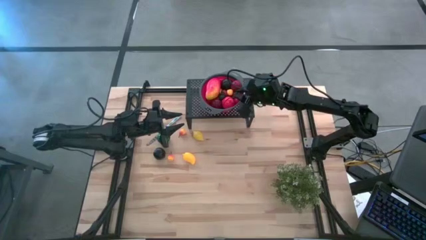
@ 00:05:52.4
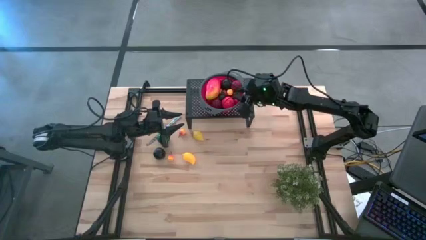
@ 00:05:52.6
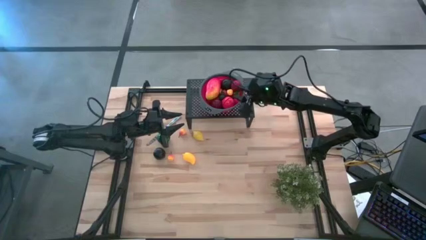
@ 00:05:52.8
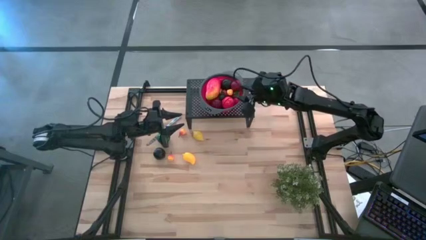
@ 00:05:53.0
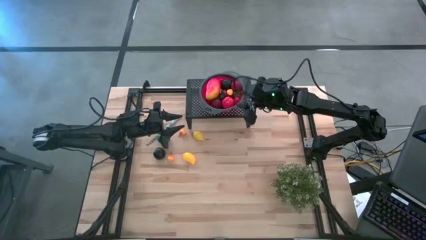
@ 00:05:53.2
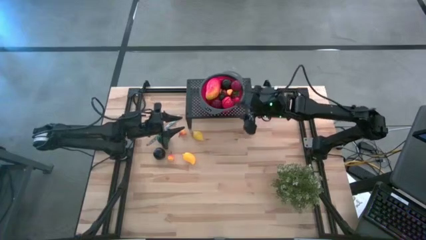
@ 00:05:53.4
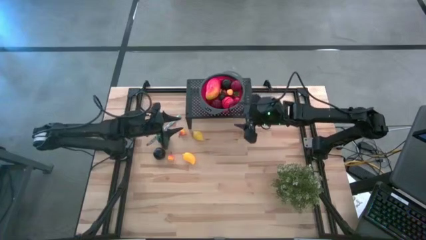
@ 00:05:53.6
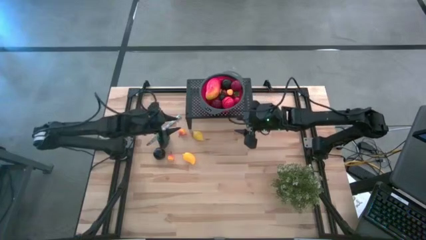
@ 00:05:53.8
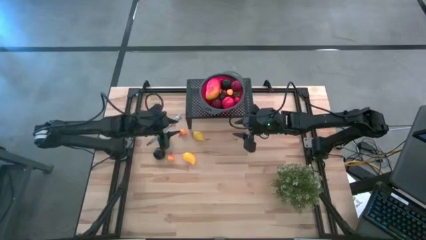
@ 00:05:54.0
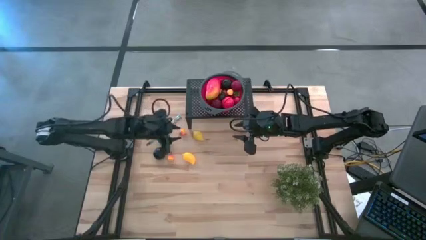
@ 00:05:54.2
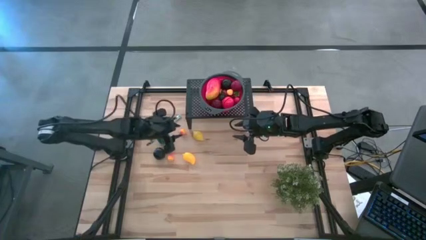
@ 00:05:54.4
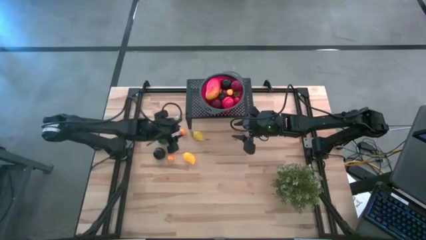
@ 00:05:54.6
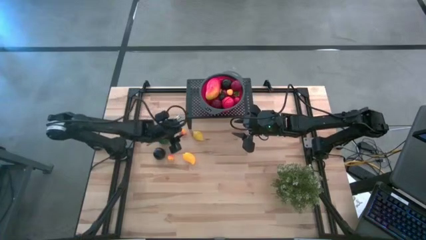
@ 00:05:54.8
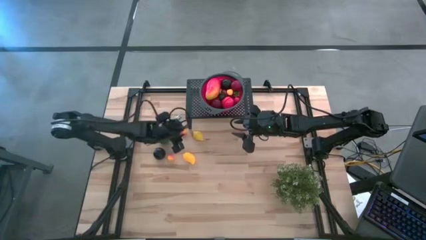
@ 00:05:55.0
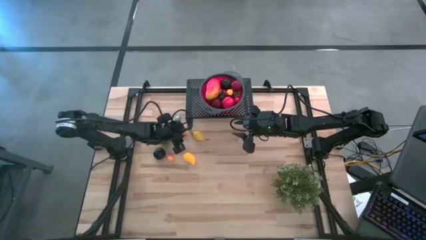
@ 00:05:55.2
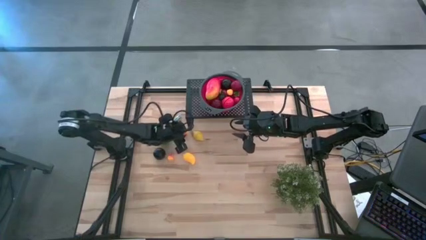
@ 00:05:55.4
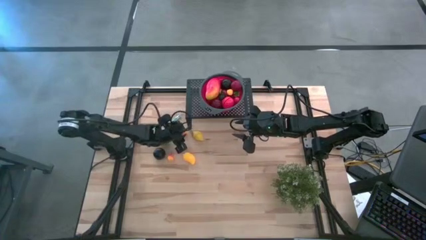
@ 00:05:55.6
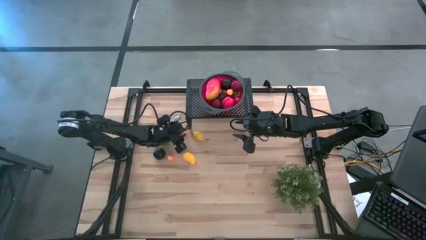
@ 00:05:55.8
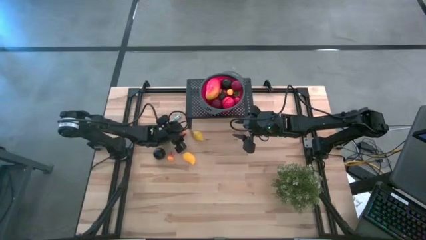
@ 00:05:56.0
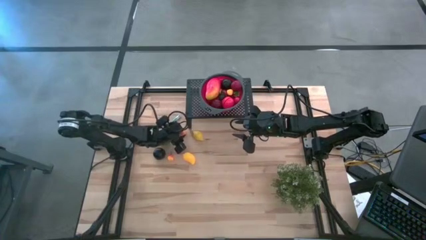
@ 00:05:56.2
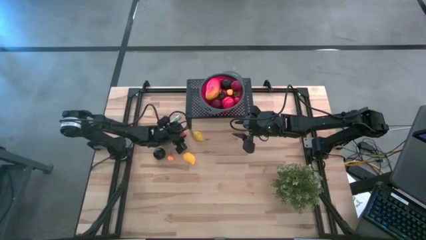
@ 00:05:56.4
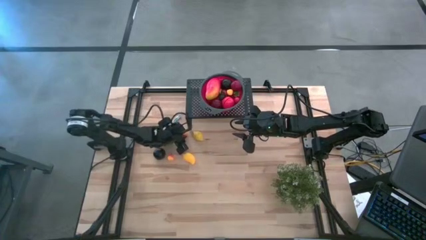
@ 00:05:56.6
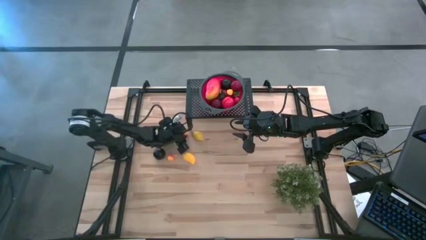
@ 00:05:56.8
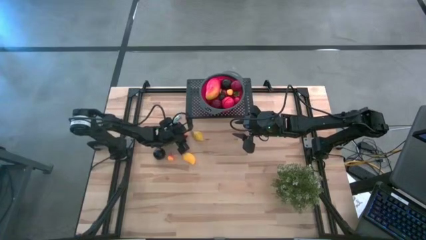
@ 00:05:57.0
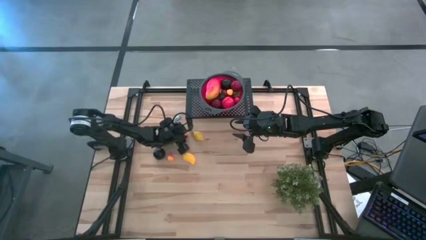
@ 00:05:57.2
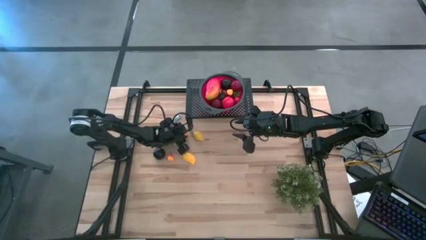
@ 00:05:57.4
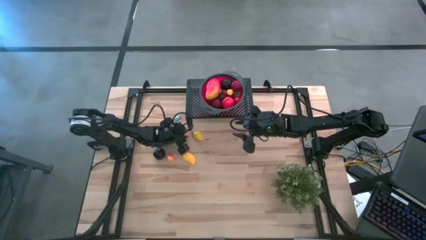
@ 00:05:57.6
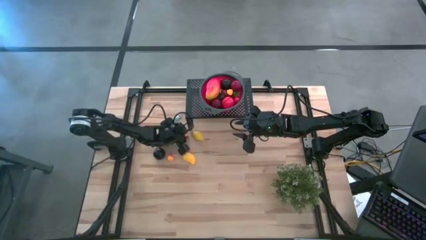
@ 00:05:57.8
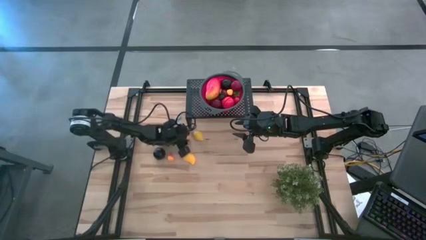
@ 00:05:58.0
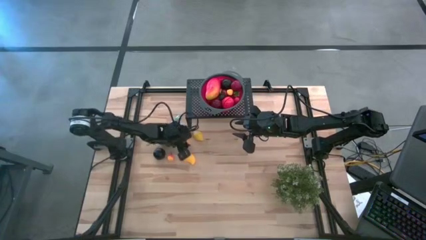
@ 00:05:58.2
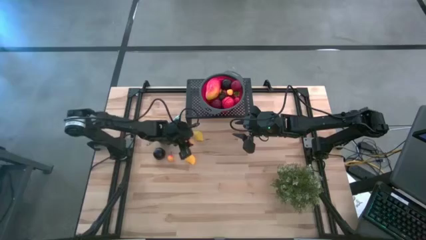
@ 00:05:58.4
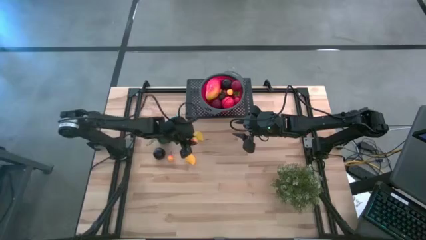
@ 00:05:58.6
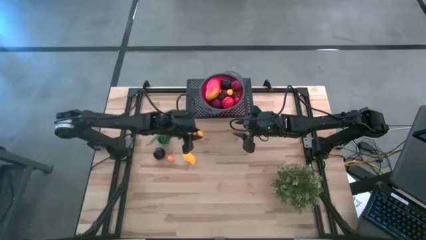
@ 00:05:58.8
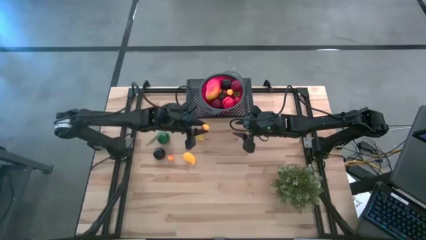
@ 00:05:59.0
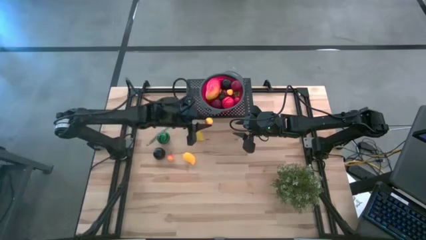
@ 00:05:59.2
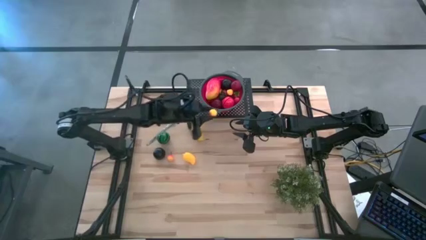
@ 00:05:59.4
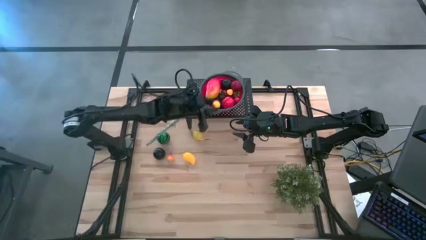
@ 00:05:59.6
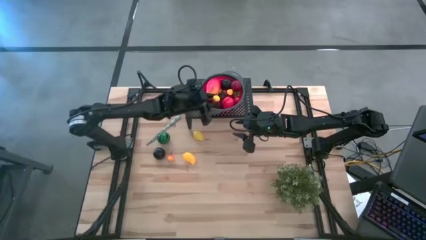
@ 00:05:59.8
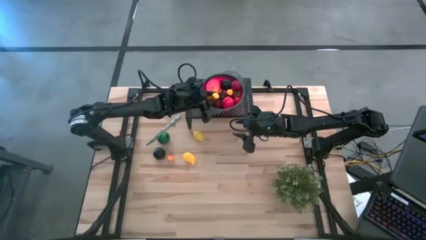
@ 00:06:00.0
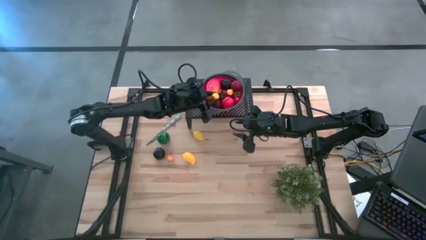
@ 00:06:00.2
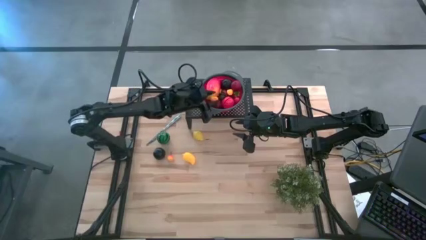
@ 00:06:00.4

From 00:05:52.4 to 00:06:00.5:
Task: Pick & Place Fruit
Put the peach in the red colander on the shelf

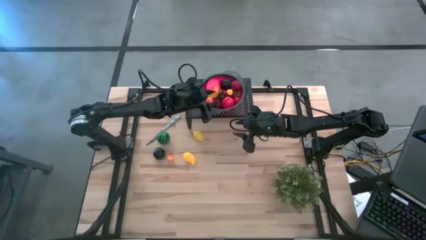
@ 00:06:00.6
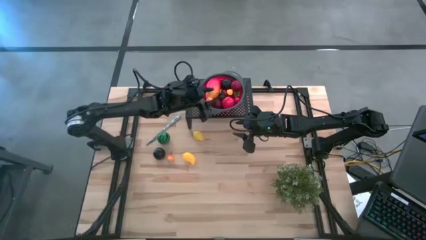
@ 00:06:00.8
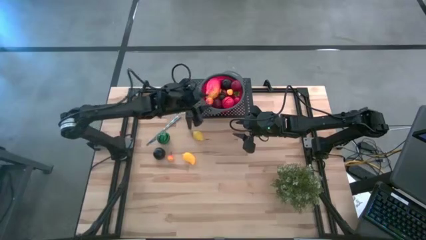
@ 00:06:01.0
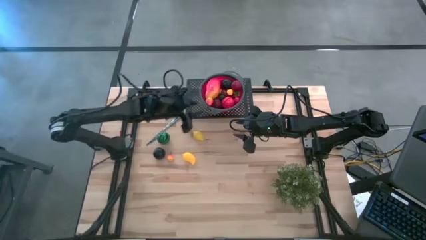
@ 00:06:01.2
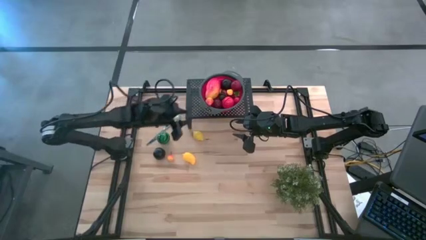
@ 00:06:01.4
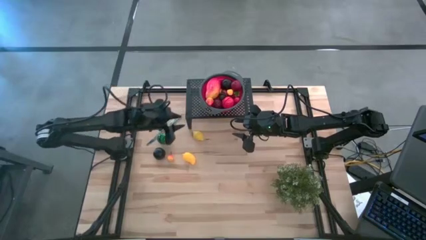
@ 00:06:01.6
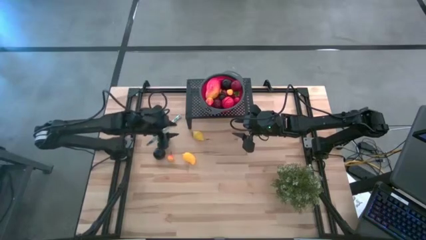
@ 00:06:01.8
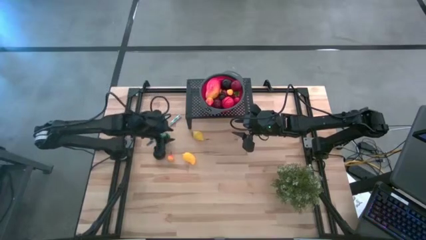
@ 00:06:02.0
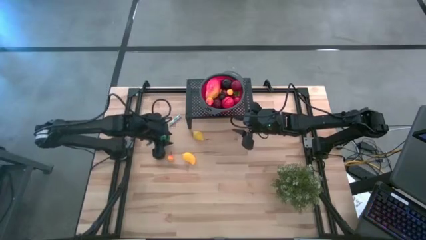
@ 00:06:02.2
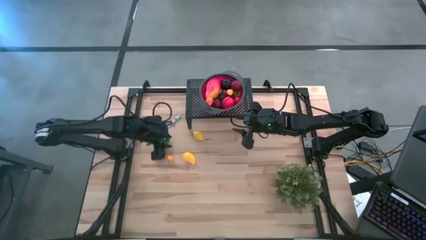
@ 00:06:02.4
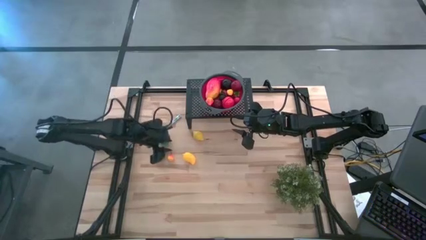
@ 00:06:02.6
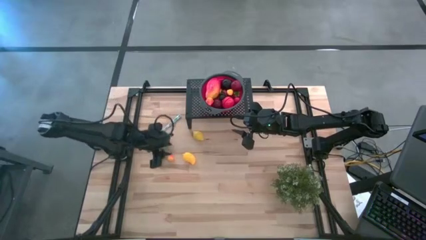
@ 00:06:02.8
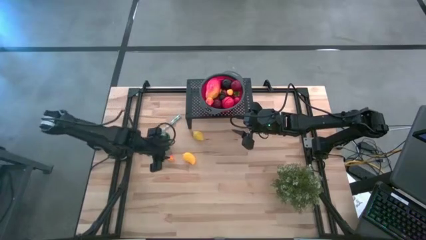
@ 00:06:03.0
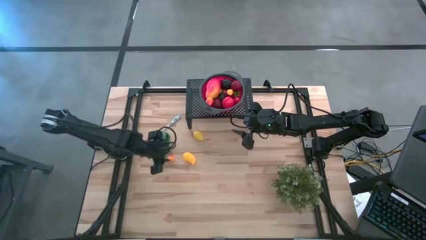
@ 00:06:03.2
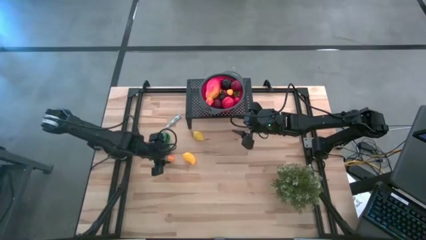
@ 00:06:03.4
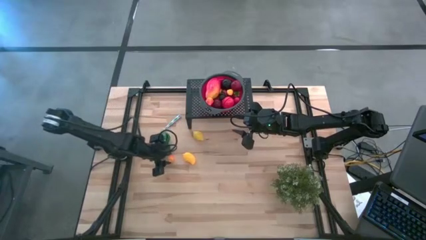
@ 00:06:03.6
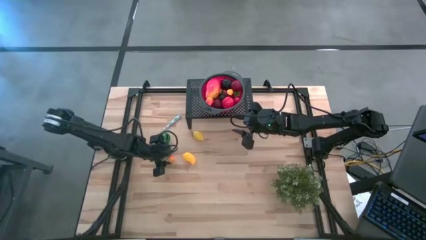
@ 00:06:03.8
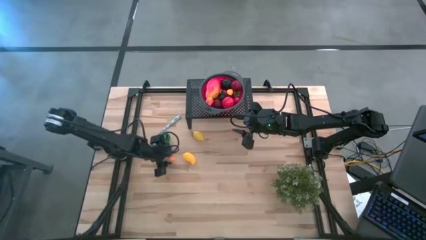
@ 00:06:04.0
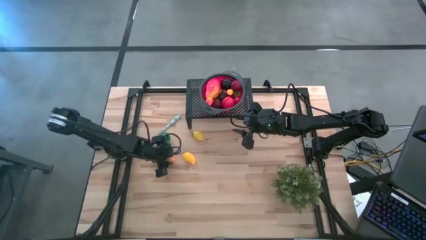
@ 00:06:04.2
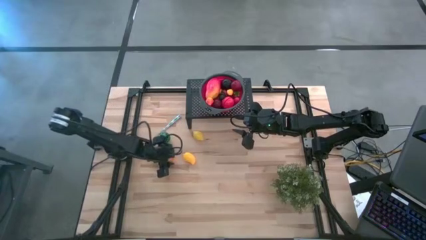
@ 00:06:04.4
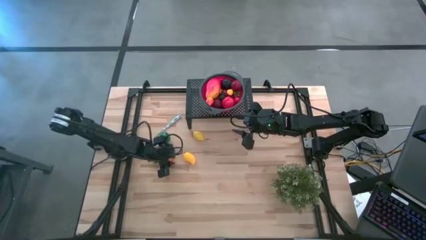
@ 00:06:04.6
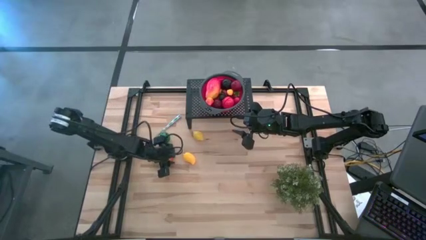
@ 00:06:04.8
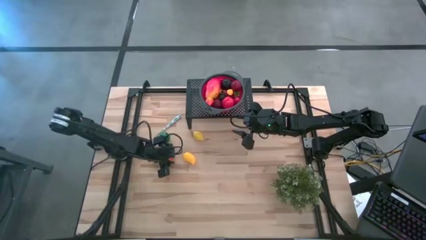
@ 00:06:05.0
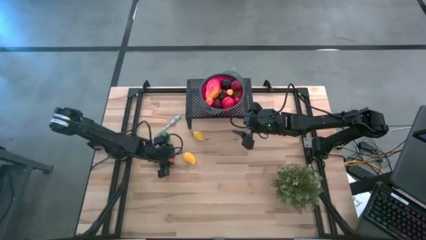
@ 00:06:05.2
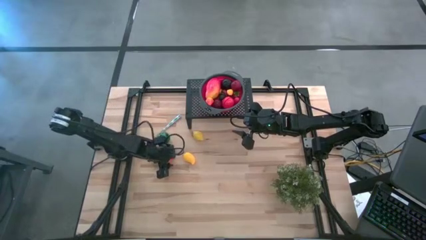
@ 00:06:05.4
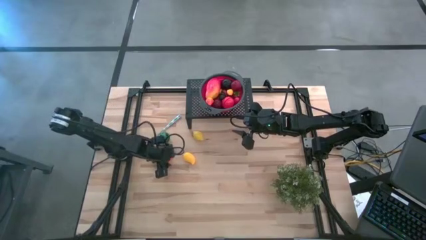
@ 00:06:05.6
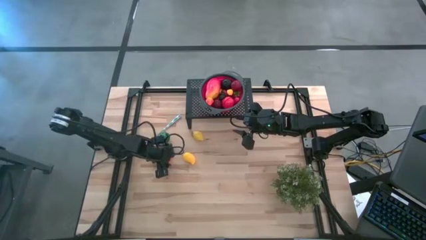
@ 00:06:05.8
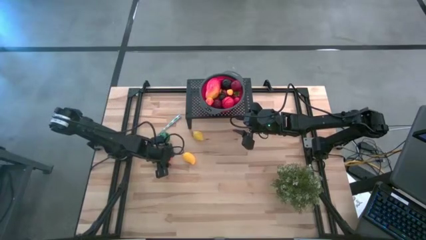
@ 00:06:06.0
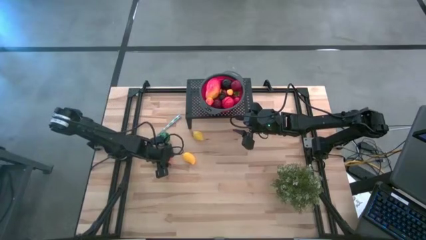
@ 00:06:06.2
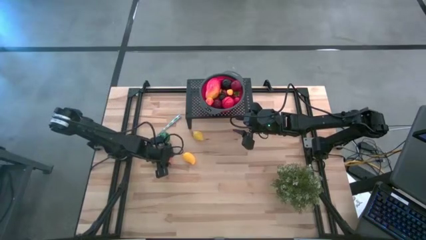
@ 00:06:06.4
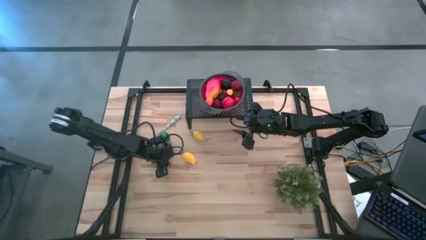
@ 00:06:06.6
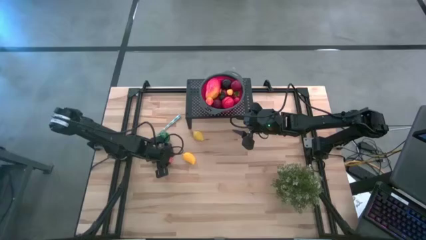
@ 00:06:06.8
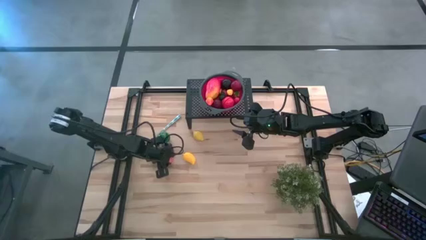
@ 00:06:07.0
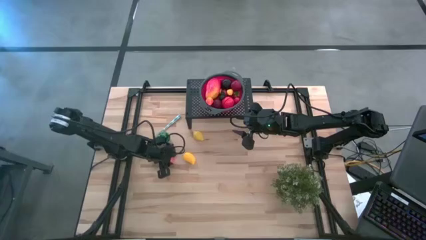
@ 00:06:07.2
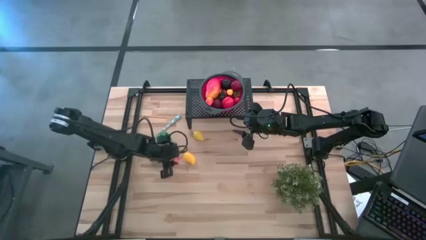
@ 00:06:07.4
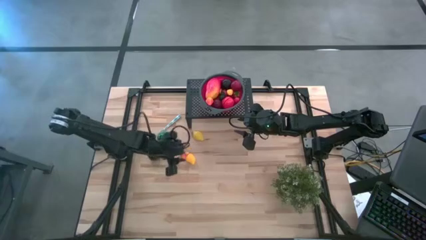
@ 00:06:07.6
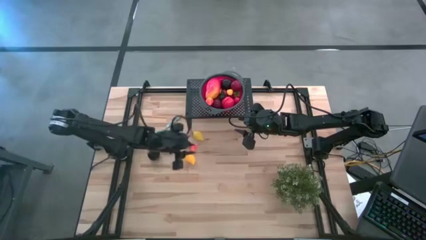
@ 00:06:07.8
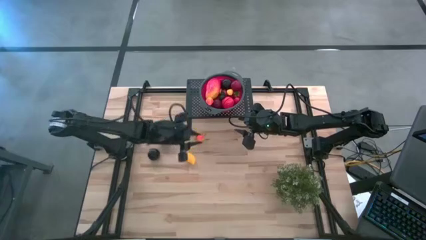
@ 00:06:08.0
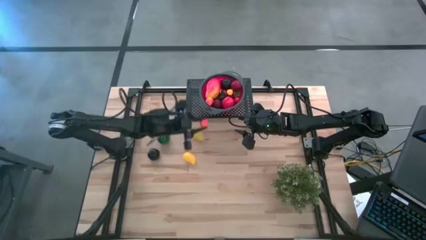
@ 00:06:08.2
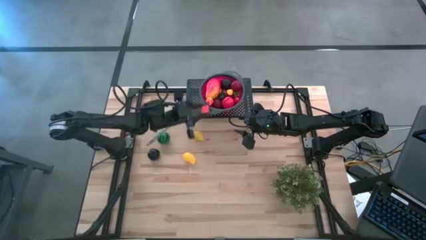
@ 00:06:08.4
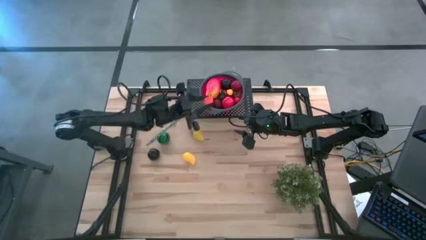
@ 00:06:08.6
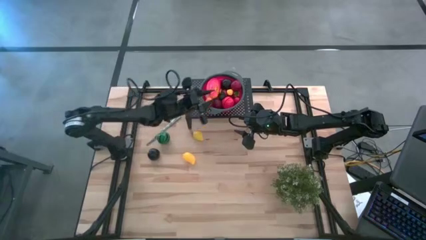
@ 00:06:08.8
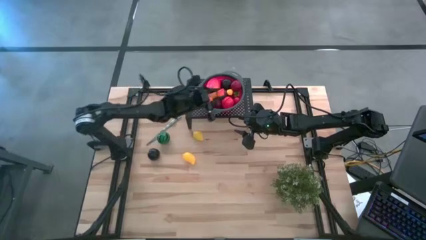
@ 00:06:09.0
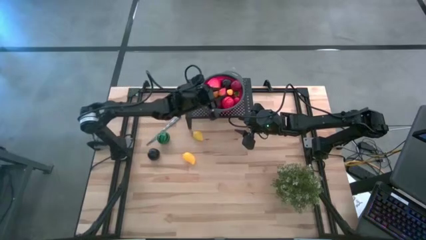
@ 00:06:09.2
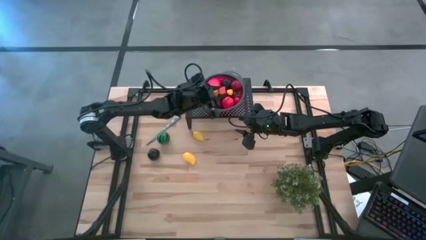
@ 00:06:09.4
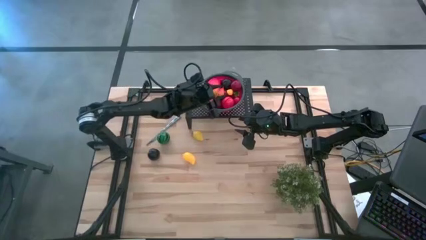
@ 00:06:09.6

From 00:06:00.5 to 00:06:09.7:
Put the peach in the red colander on the shelf
